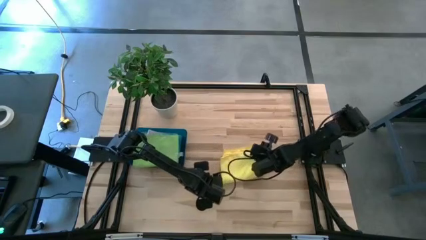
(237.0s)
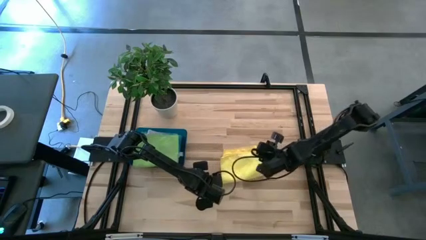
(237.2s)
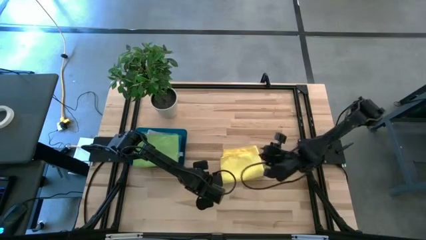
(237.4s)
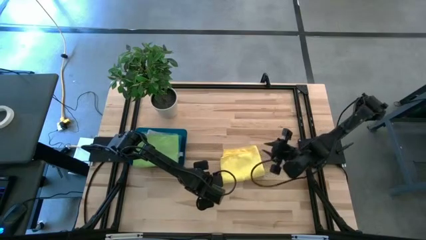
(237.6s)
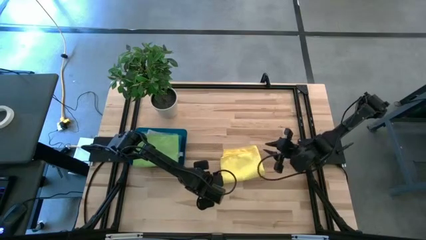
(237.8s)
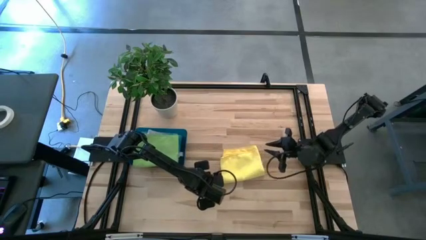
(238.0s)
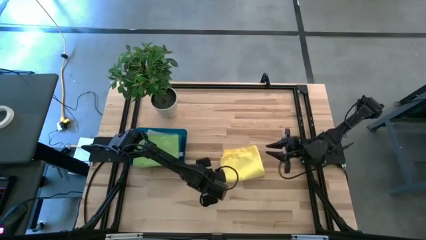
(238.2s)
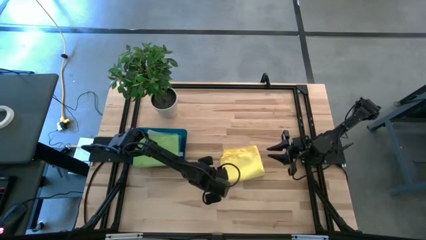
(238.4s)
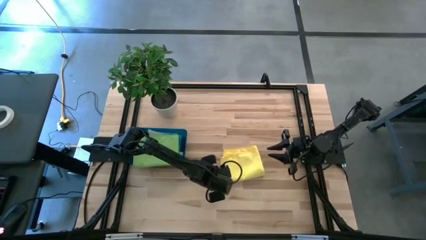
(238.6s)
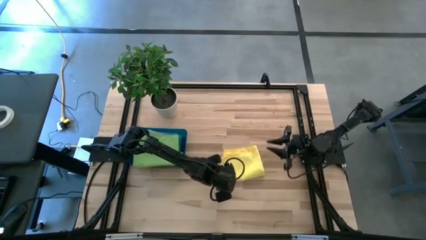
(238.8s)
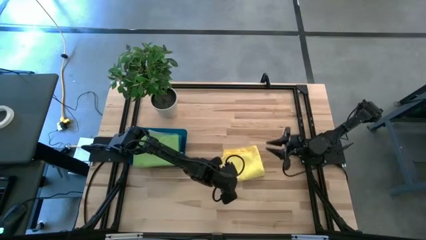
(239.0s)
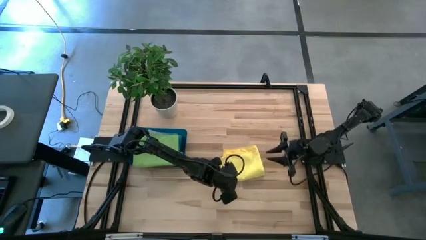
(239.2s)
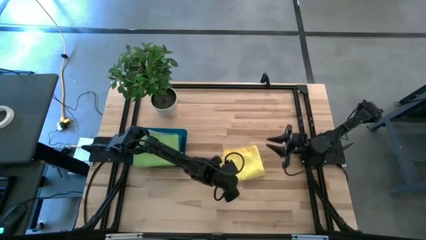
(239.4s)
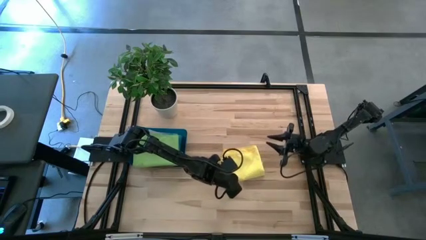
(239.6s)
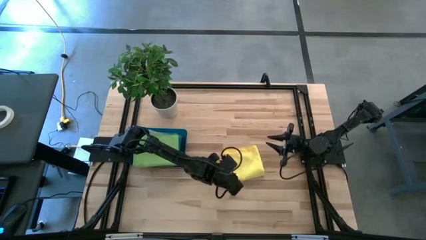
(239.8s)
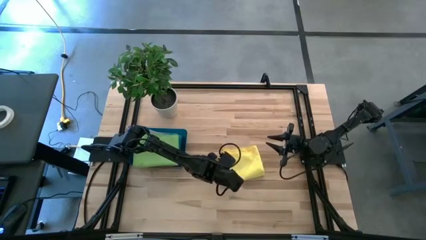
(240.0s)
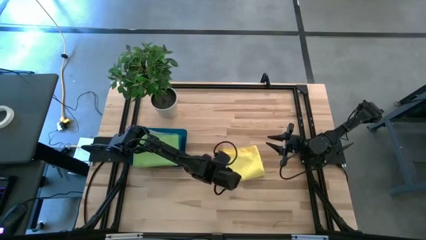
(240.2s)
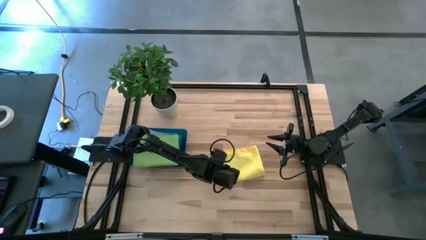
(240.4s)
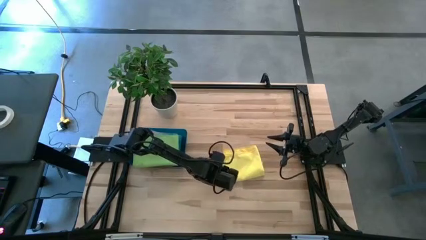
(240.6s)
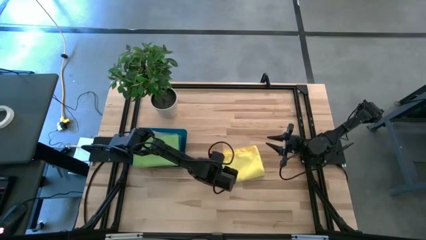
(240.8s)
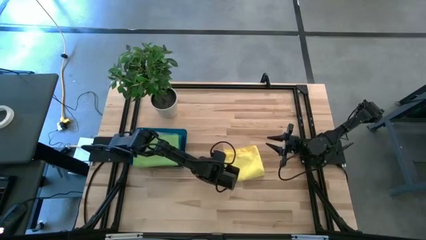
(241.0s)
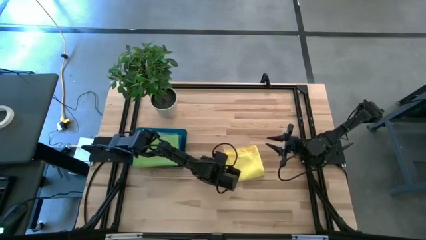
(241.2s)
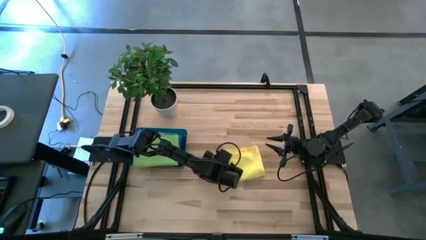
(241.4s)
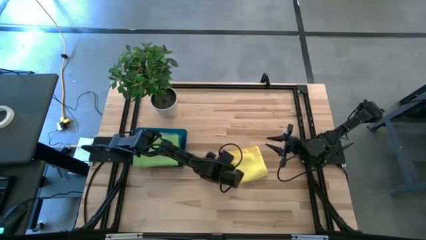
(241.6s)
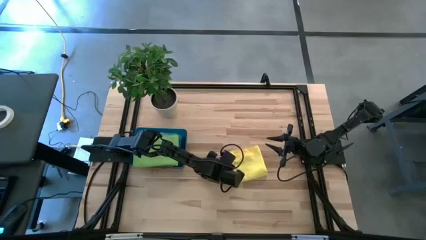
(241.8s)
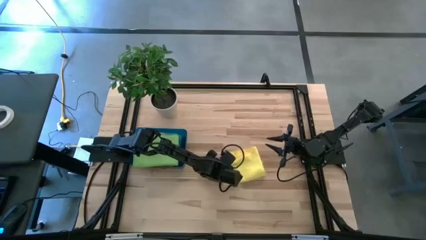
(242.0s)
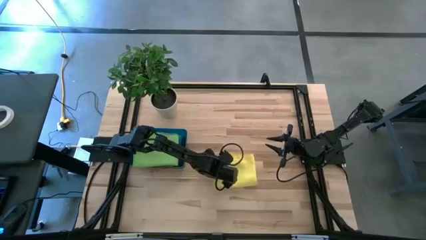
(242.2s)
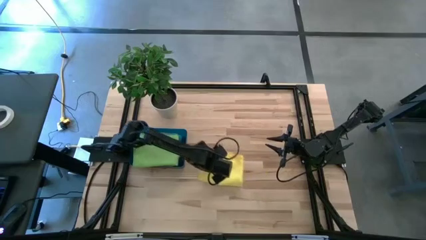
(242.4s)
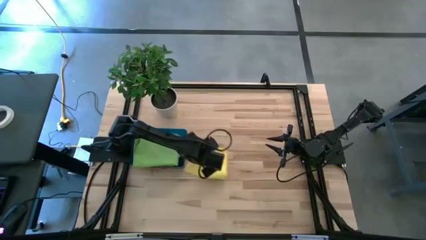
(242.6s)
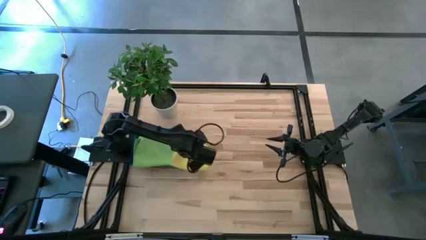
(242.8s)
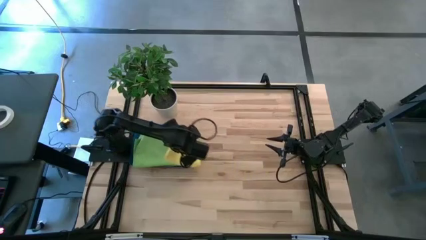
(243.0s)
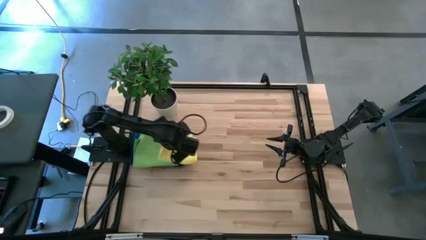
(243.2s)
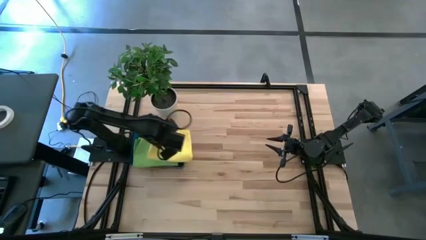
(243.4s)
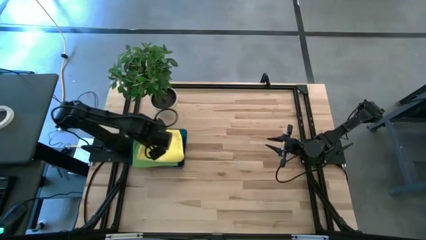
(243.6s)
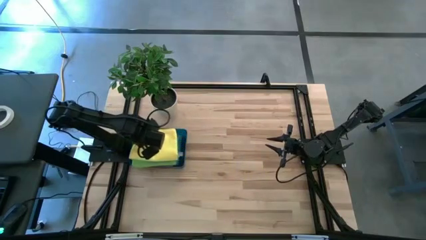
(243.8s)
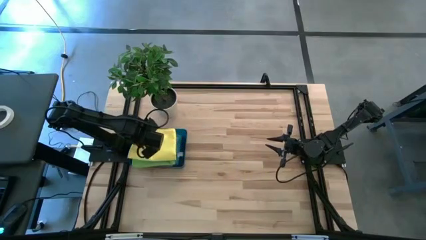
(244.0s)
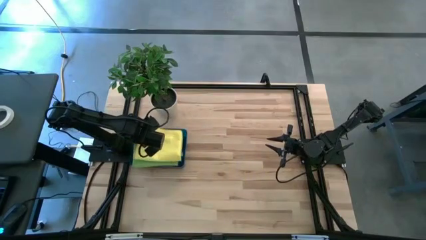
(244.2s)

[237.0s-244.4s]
Task: Fold microfiber towels
Stack the yellow microfiber towel on top of the green microfiber towel in the blue bin

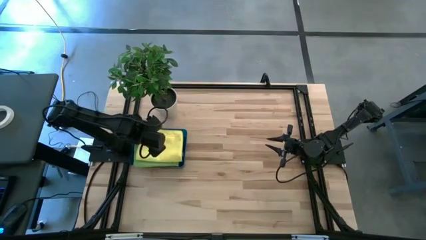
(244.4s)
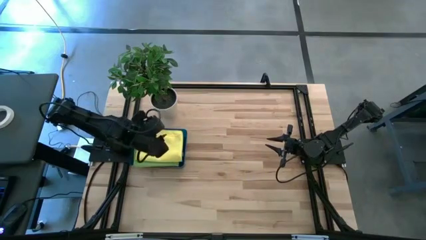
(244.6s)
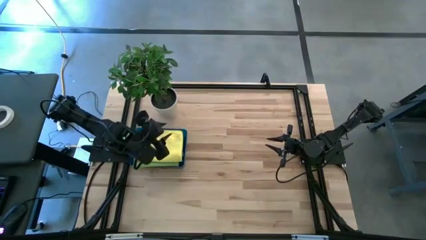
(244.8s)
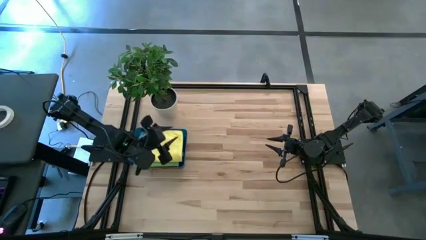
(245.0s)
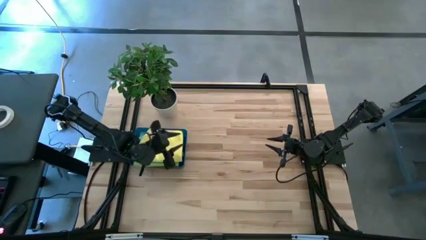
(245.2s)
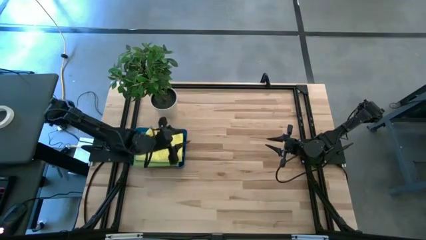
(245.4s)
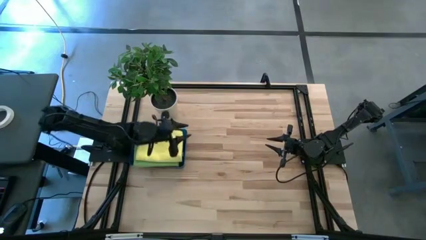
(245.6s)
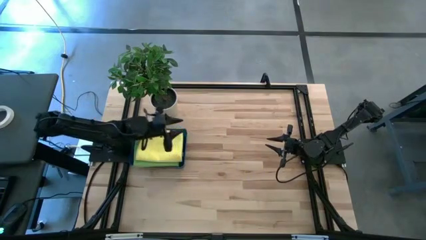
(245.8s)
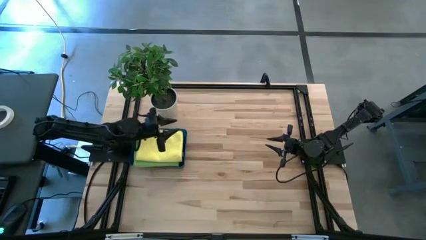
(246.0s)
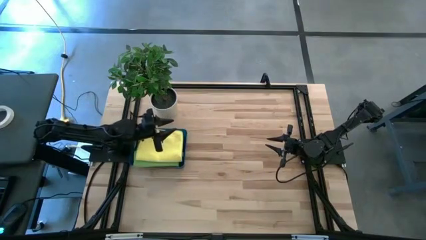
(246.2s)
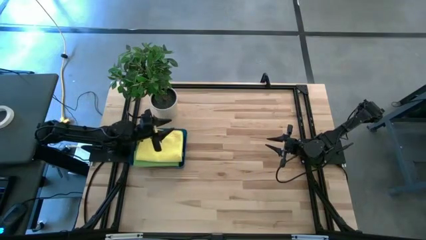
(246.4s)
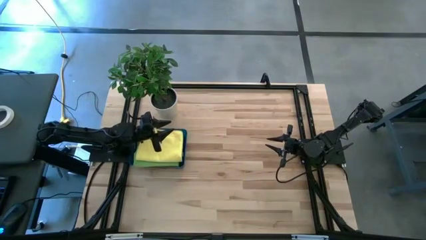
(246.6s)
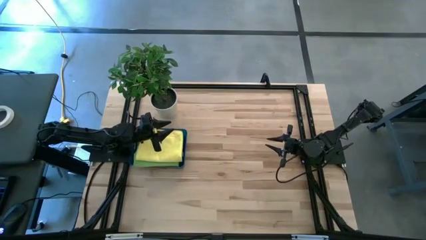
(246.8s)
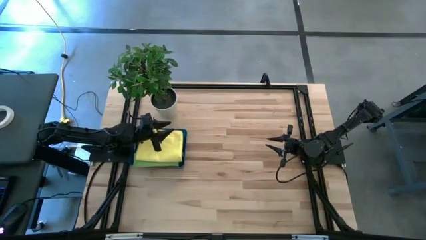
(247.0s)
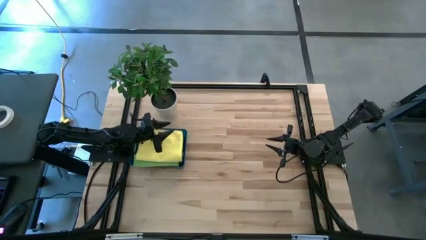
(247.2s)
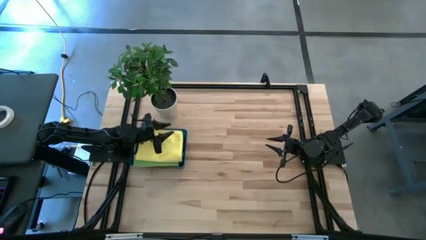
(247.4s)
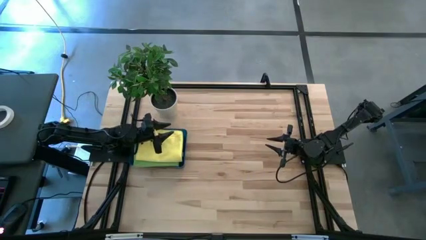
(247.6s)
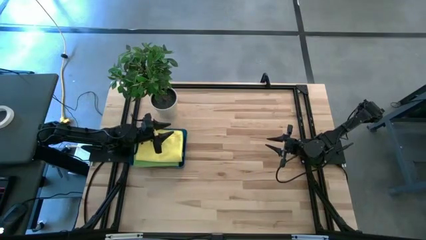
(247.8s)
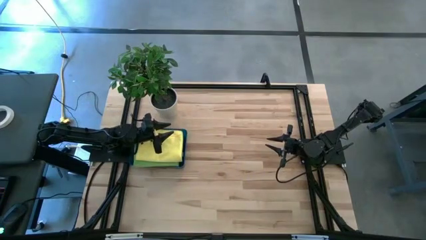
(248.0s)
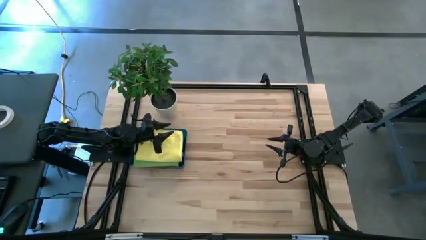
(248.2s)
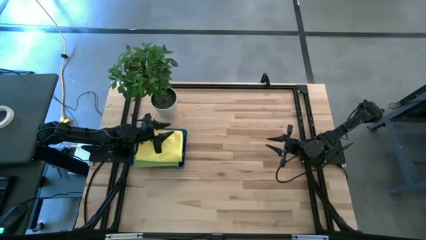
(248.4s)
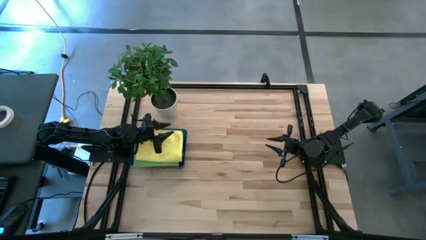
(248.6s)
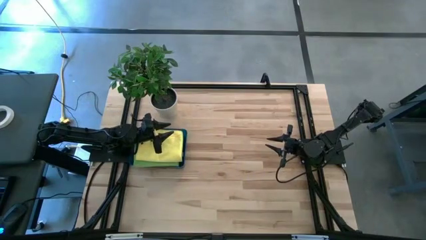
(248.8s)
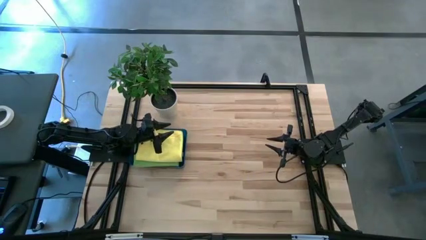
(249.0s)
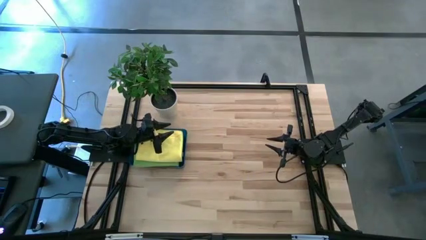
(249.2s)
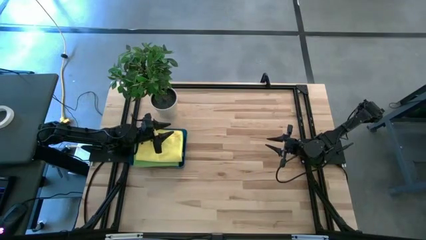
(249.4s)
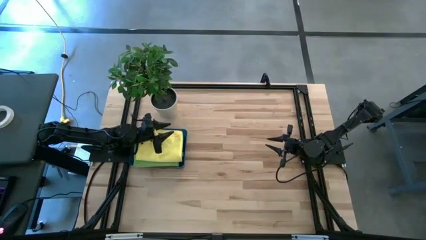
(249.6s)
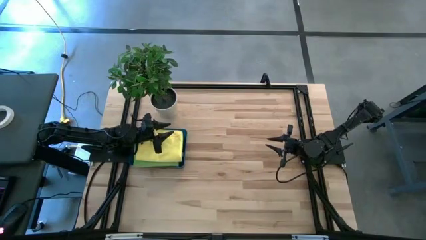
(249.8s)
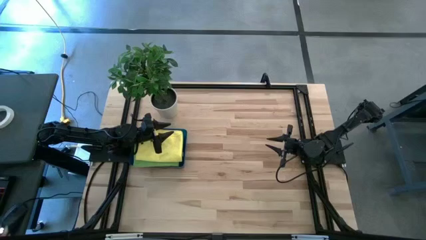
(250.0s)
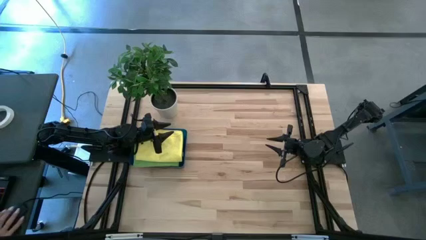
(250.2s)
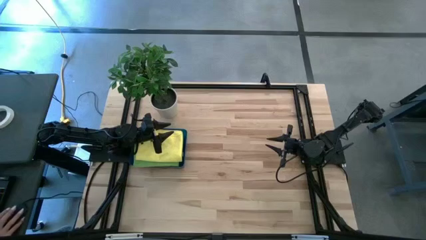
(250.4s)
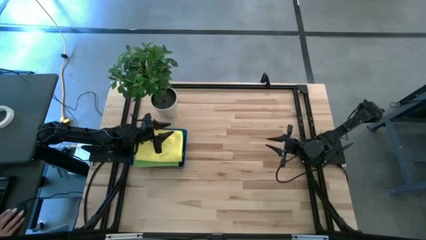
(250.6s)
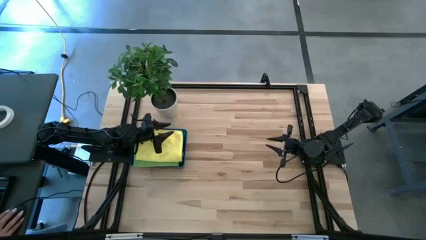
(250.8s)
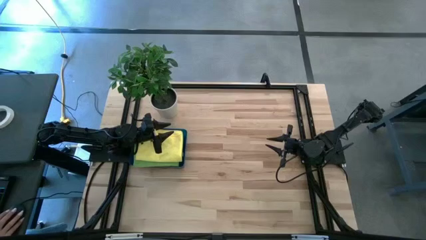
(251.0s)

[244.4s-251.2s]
Return to Home Position

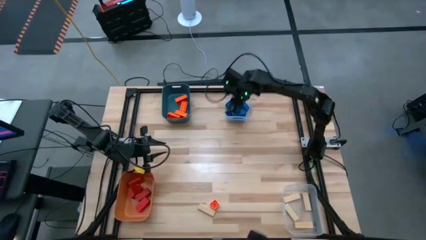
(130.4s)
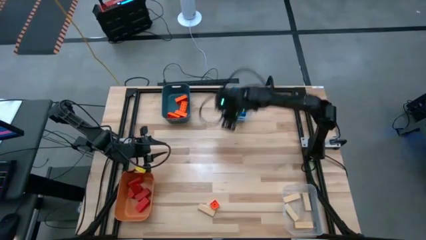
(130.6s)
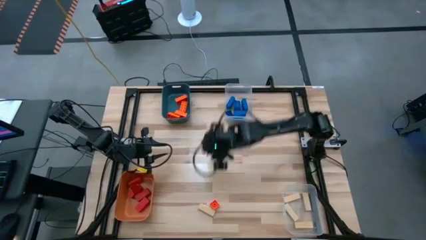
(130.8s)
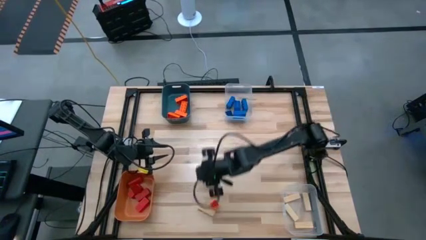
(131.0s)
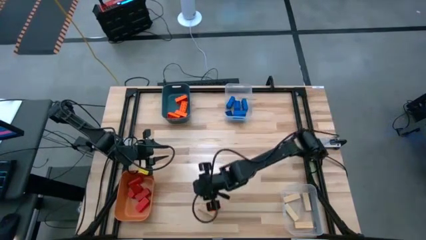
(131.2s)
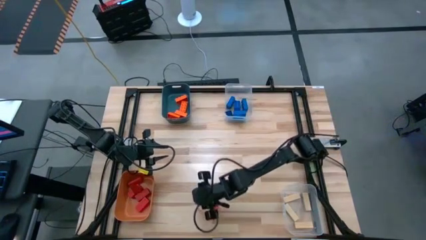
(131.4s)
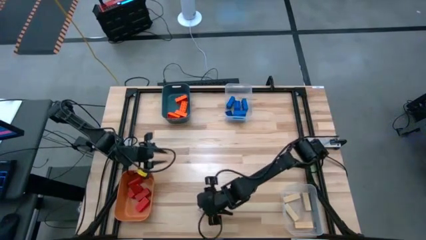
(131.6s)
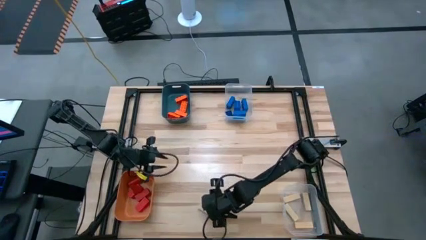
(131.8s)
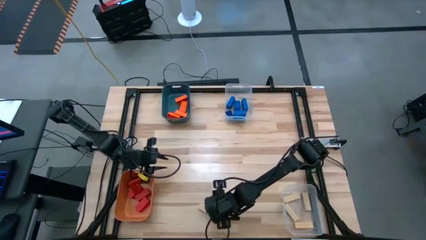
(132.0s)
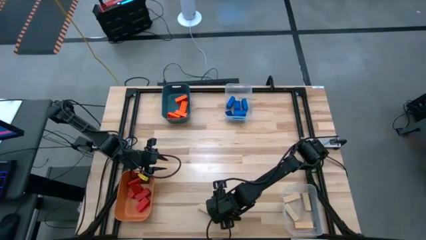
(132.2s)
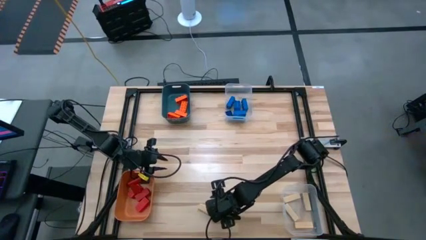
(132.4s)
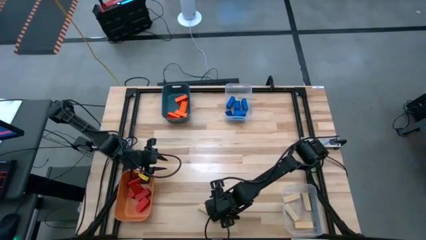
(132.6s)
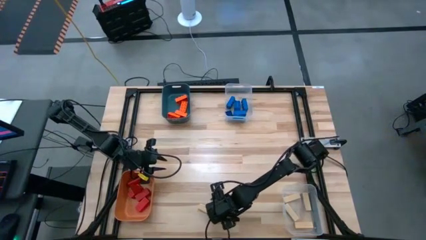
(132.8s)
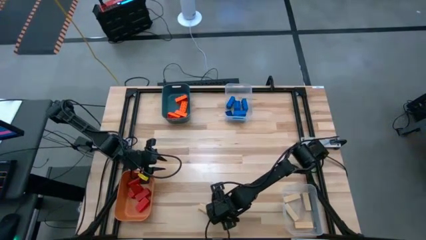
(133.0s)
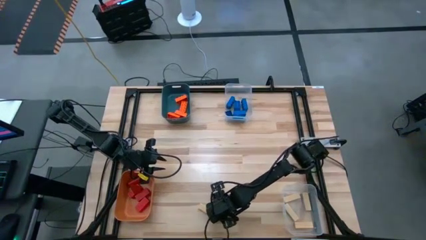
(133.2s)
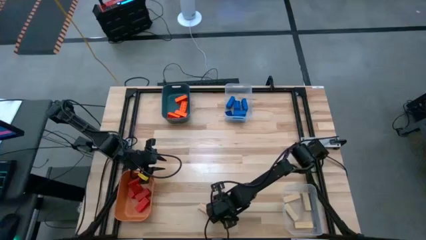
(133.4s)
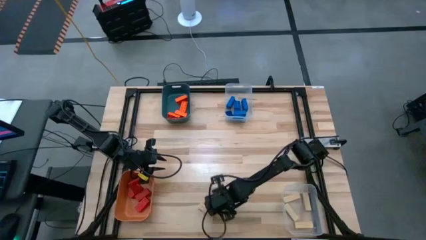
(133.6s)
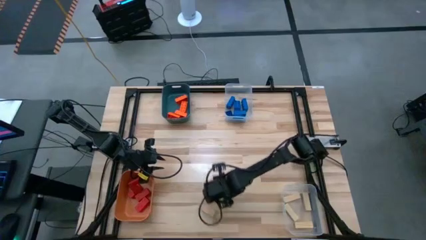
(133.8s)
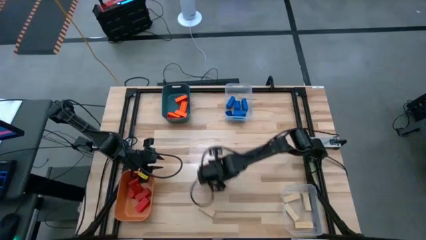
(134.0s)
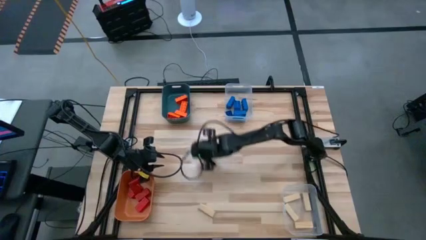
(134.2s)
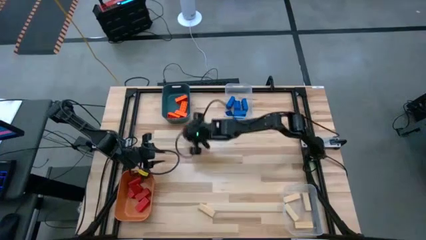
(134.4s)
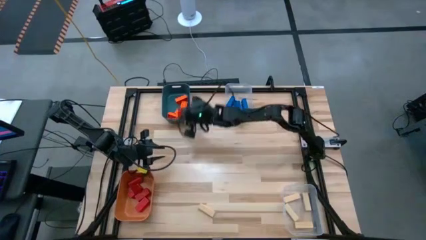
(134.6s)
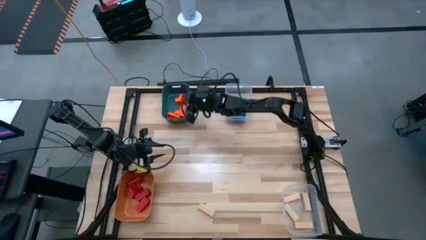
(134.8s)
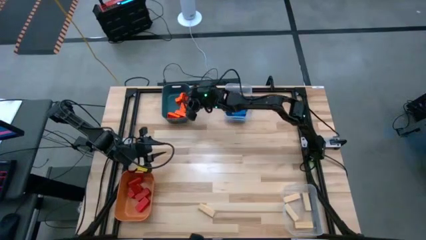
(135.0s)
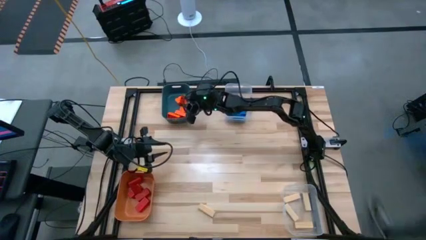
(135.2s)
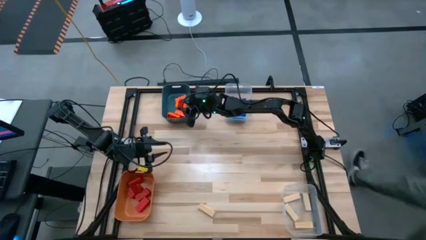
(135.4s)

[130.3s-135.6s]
Task: Sort blocks
Put the orange game piece into the blue bin
